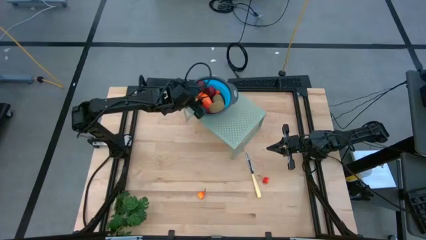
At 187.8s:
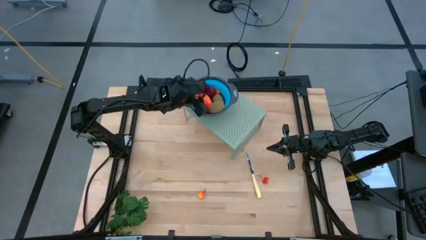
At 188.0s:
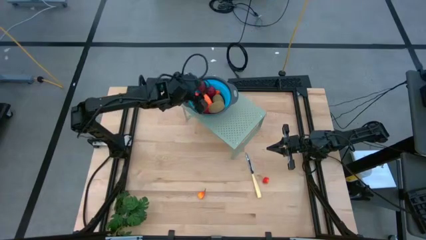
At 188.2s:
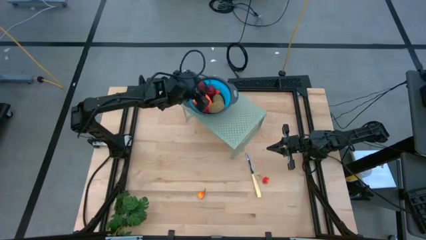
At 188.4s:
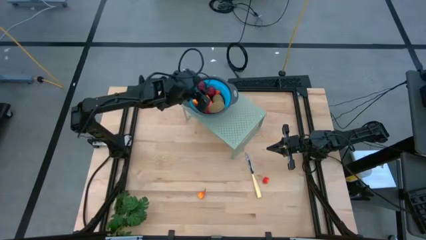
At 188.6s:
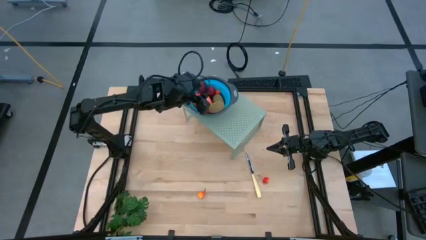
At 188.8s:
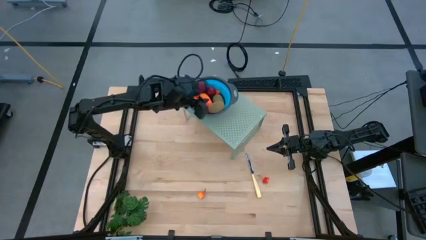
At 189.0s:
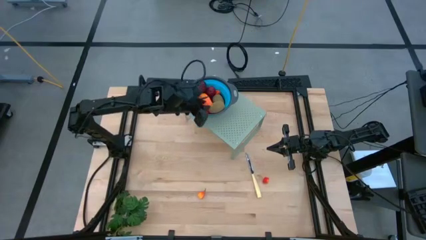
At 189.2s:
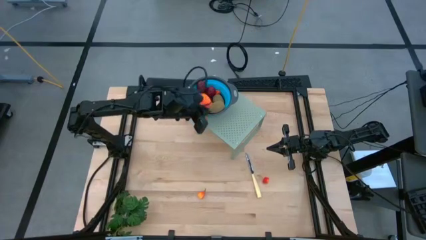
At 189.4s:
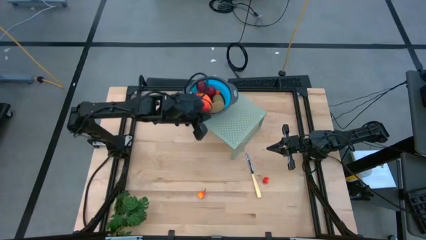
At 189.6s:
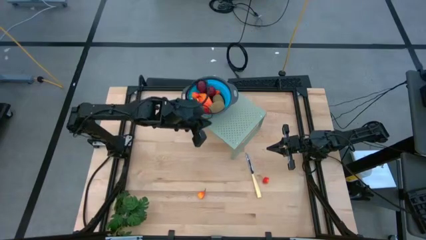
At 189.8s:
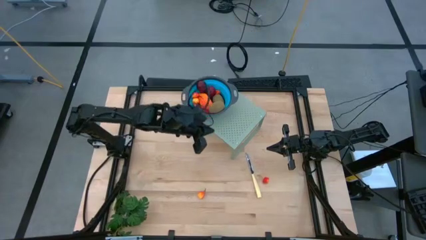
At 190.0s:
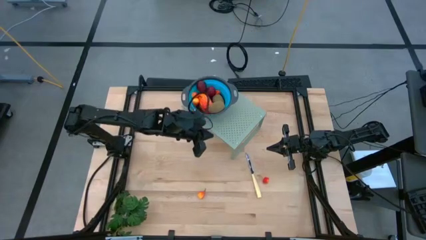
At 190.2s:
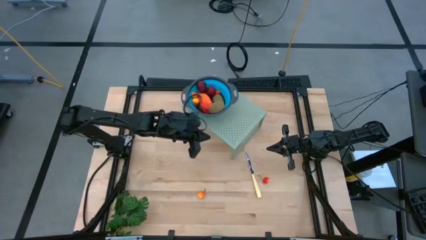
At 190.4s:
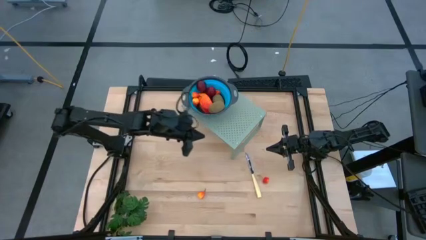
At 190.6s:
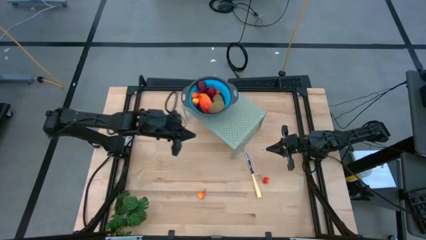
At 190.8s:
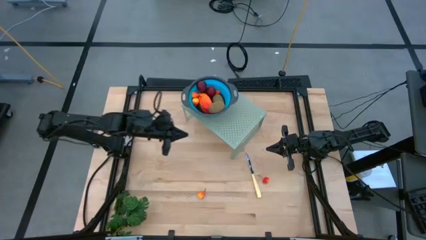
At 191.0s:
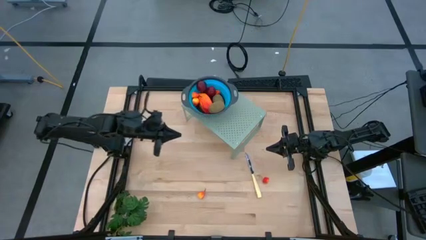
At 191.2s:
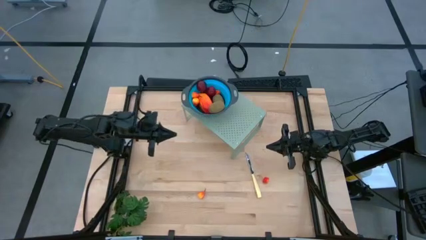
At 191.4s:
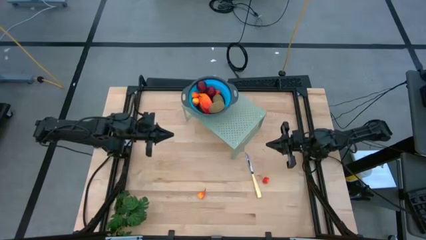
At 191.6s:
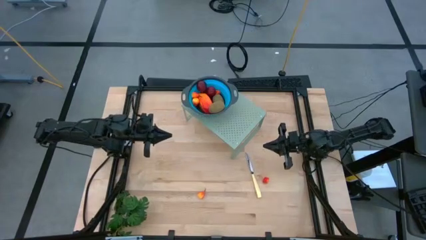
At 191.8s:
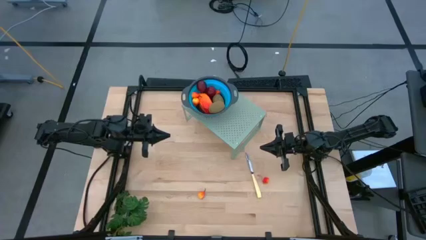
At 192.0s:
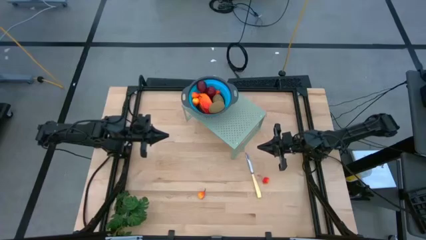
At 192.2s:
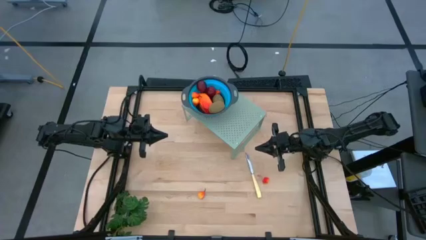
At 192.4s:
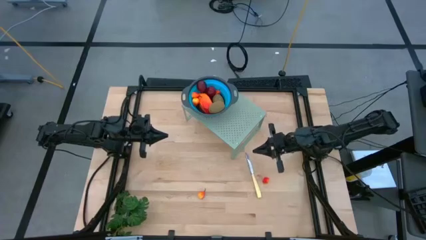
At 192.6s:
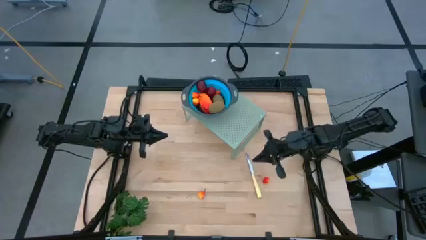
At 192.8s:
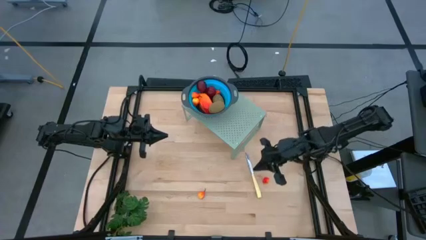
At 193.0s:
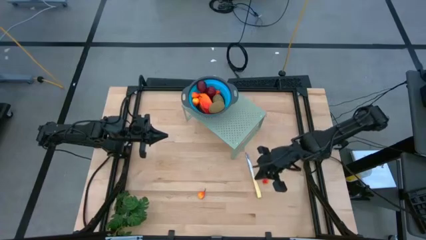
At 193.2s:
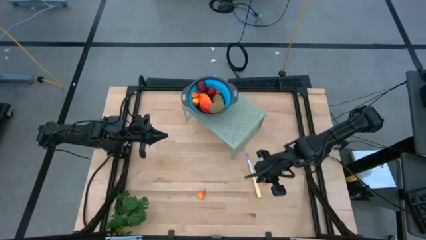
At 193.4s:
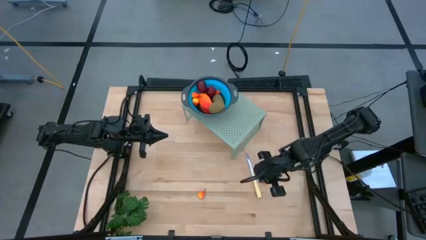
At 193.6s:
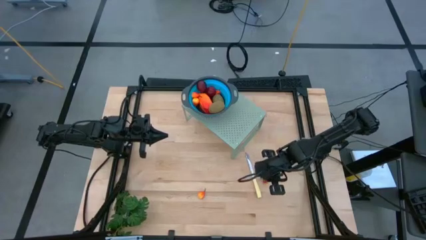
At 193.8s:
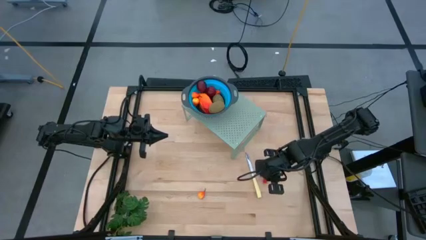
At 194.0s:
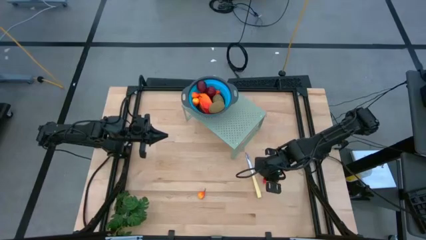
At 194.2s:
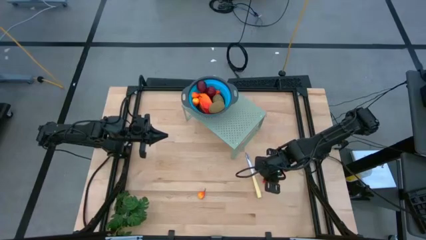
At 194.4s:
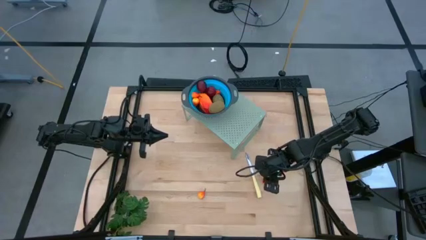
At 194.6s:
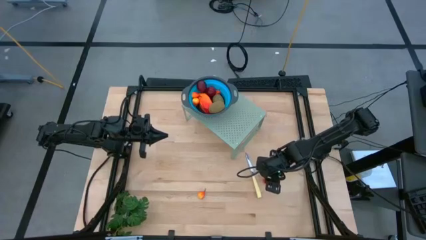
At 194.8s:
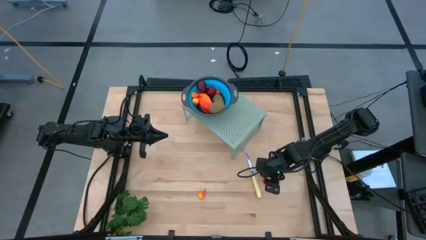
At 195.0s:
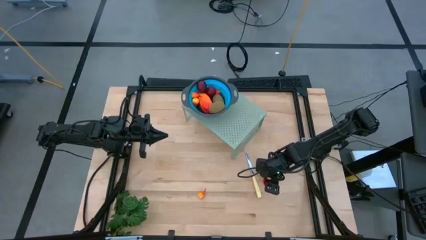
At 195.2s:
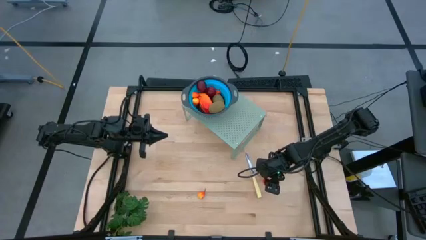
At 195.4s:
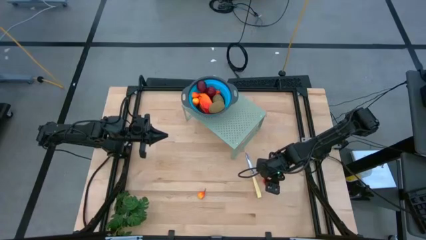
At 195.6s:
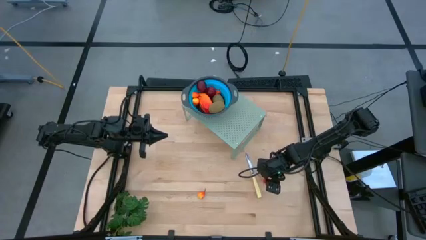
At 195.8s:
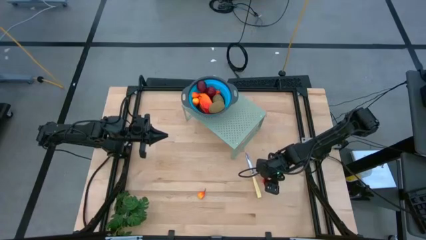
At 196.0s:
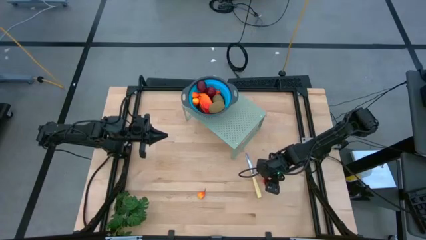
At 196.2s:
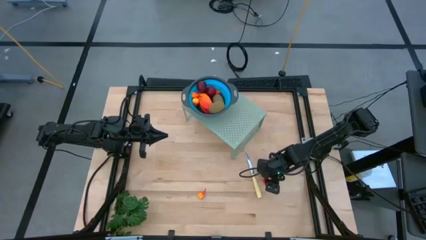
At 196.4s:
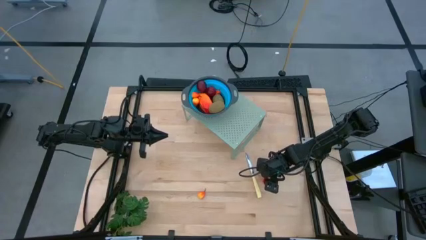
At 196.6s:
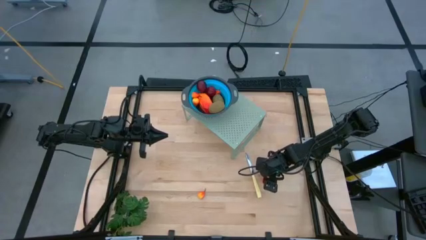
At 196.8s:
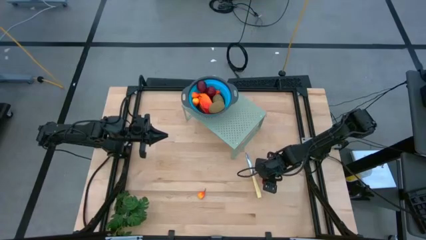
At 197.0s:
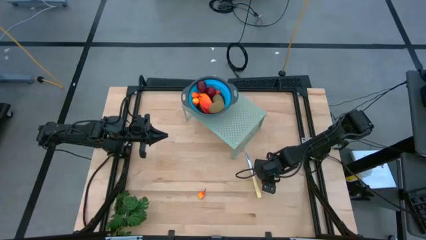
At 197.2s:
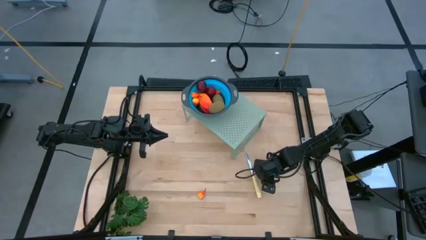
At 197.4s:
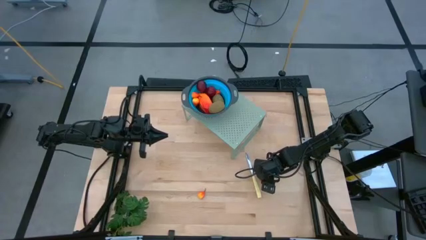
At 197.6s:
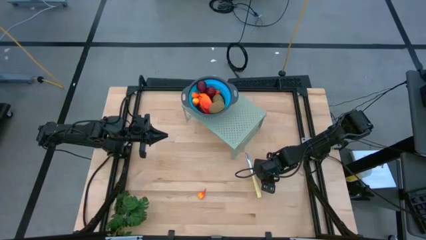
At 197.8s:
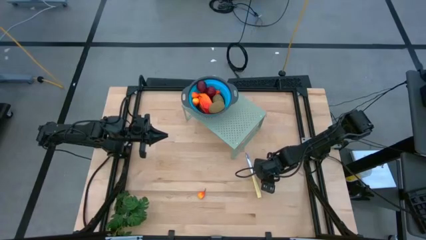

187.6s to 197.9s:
Task: Pick & Place Fruit
Put the pear into the blue strainer bowl on the shelf

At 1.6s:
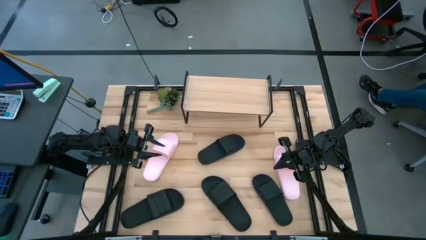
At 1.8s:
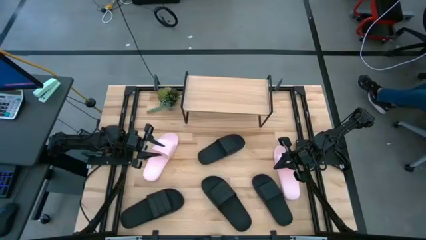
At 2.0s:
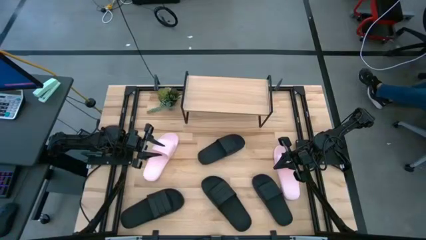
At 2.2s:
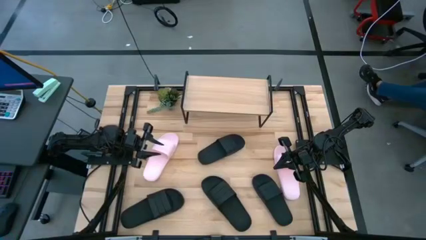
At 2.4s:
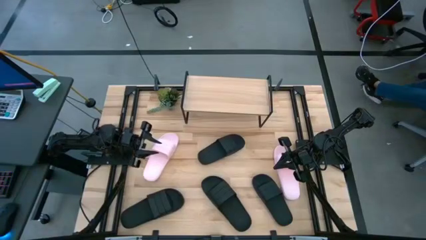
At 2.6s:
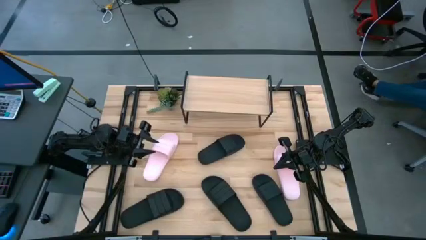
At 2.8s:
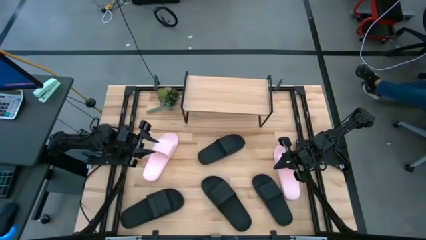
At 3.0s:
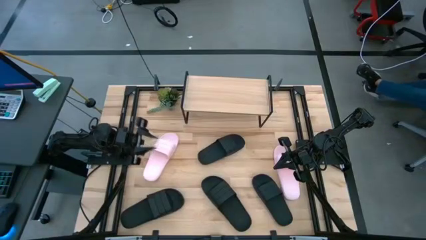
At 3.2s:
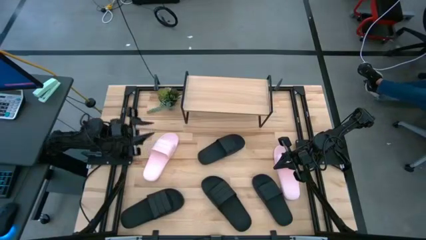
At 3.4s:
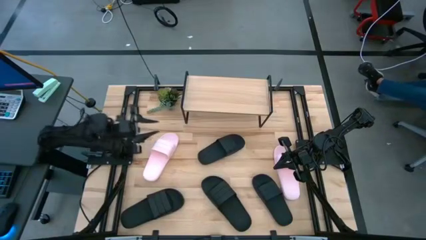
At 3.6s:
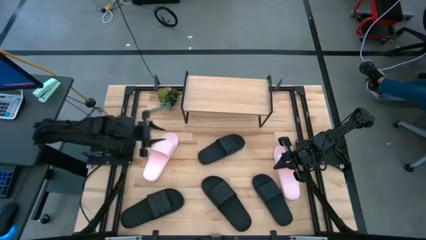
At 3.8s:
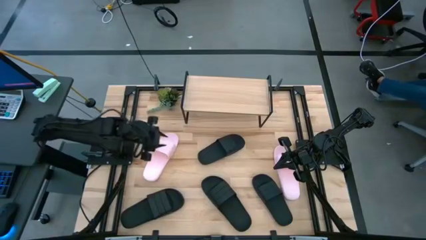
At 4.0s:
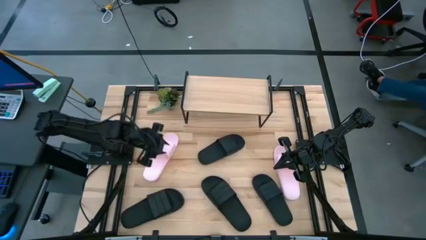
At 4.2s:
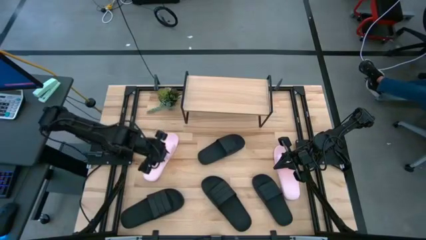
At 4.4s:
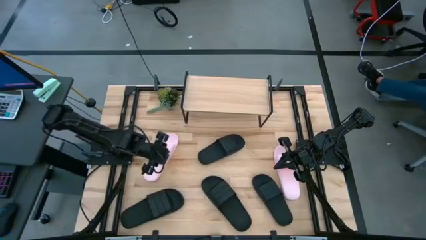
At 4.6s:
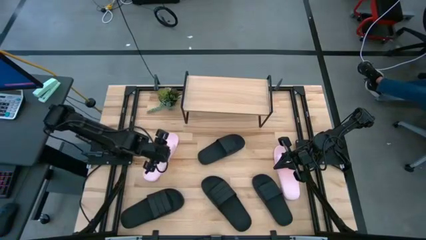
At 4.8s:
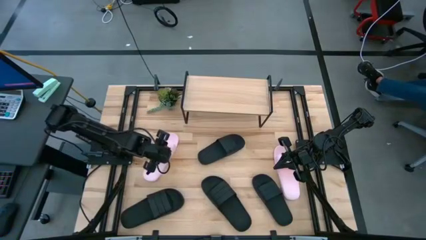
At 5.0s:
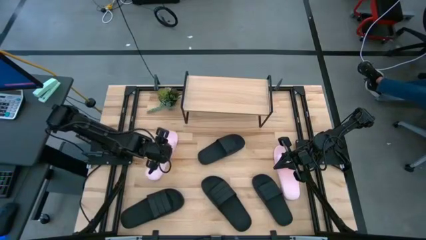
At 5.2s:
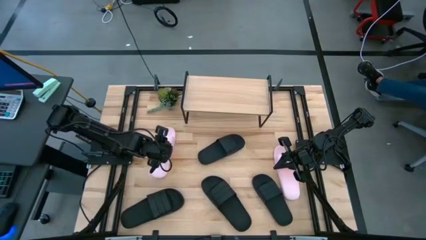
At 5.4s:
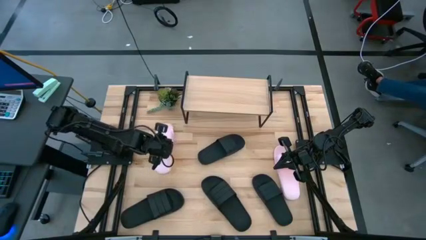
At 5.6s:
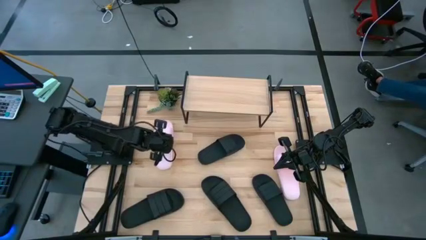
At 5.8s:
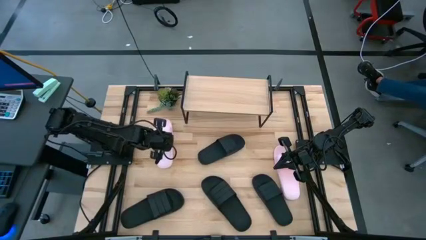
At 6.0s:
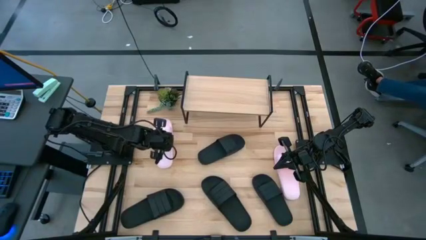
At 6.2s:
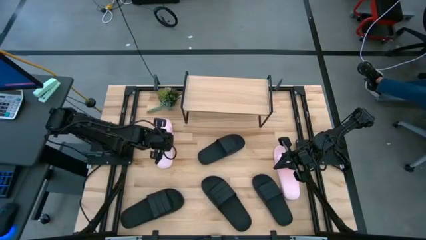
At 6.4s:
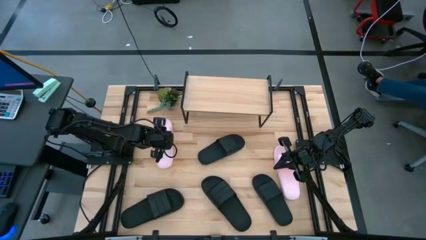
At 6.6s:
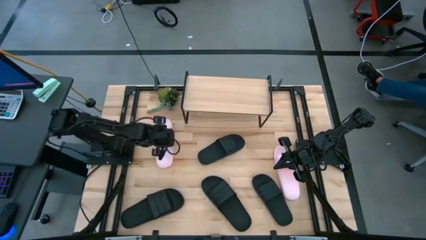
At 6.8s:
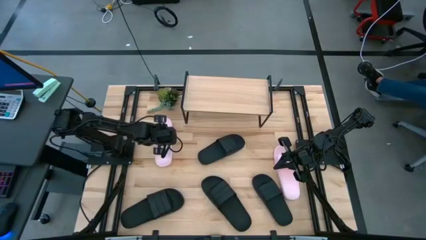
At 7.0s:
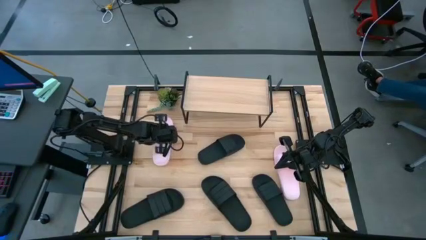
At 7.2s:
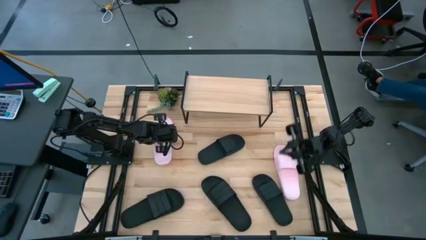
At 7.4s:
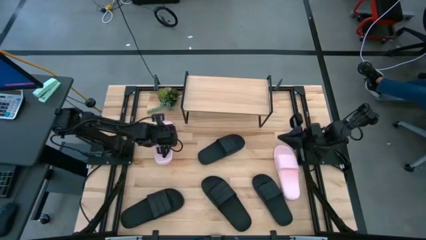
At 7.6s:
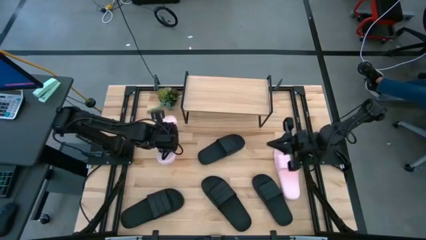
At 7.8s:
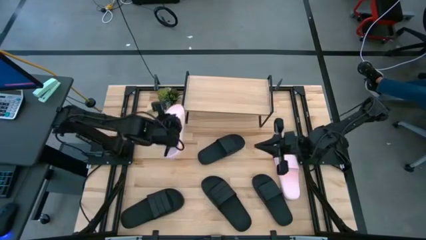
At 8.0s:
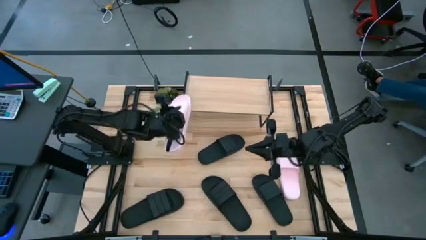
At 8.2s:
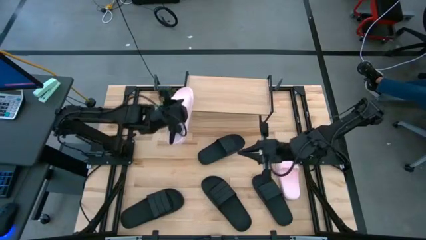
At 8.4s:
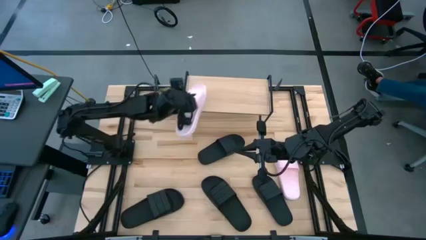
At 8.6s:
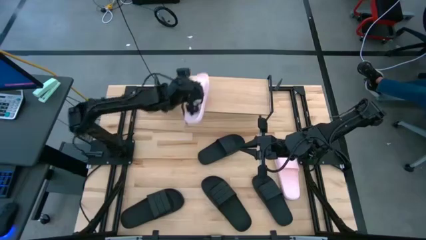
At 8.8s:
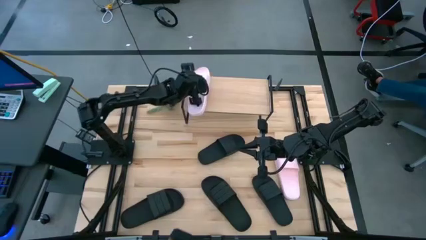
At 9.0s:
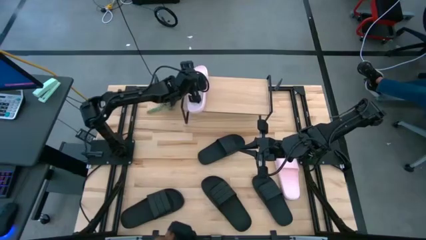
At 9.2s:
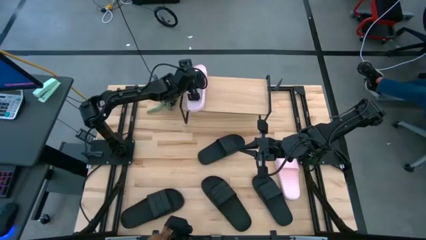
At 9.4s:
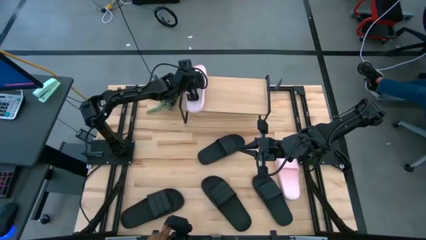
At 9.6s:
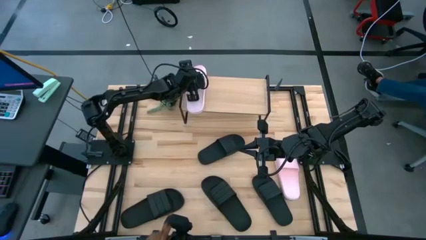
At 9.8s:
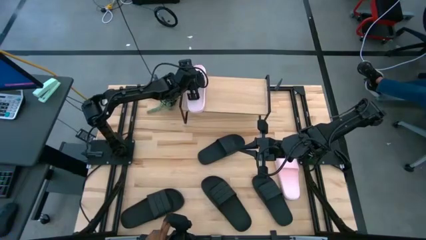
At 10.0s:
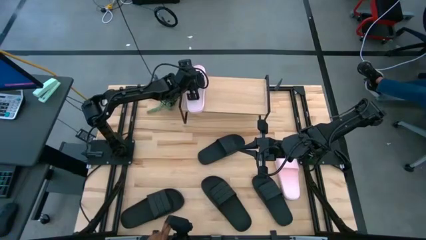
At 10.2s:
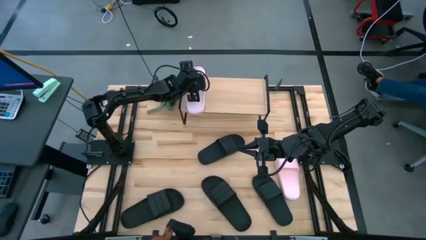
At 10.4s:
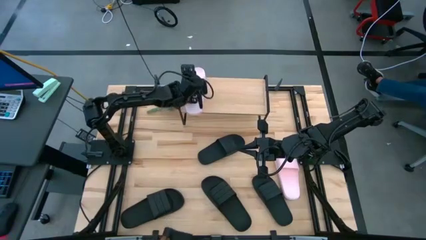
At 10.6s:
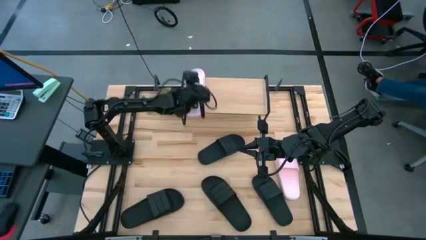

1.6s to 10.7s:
Task: Pick and place slides into the shelf
Put the left pink slide on the shelf
